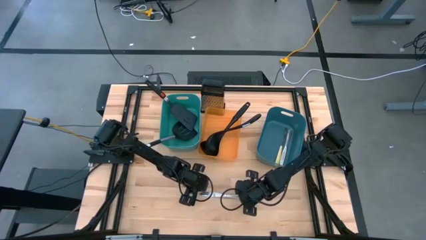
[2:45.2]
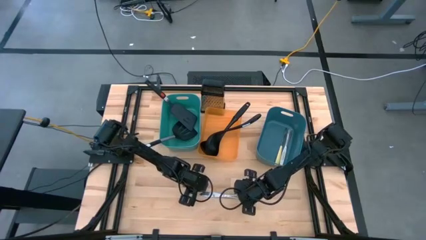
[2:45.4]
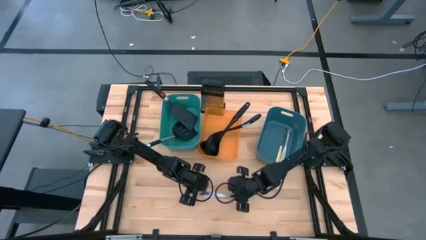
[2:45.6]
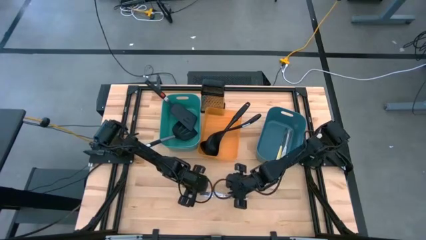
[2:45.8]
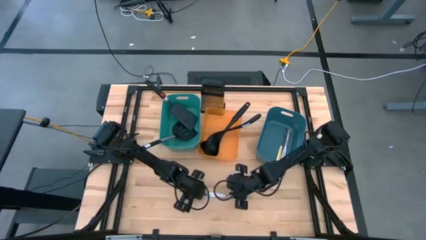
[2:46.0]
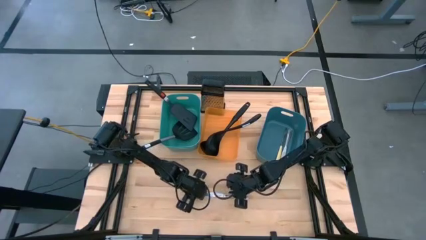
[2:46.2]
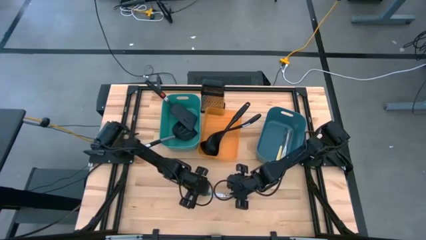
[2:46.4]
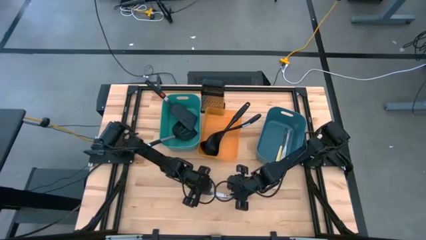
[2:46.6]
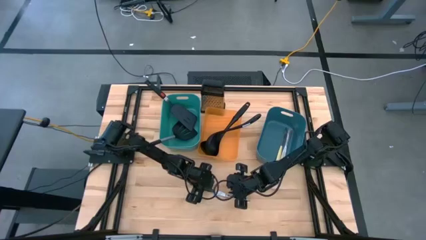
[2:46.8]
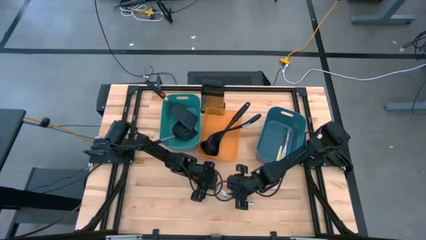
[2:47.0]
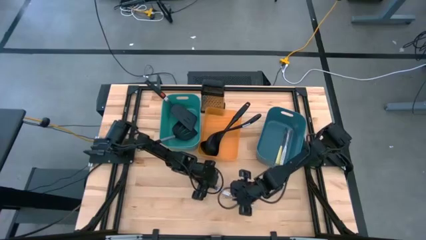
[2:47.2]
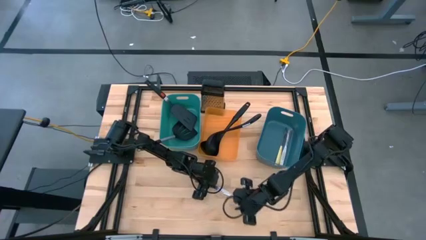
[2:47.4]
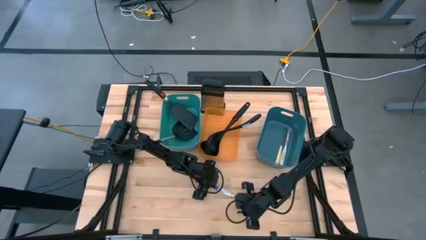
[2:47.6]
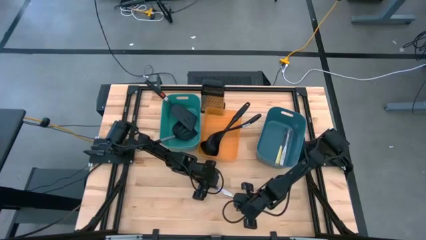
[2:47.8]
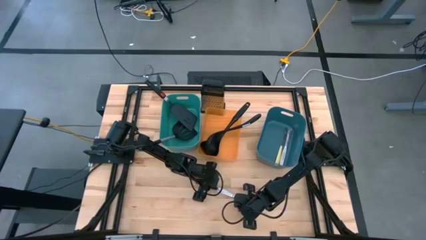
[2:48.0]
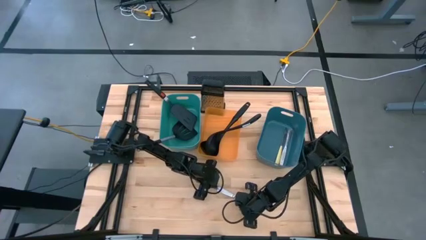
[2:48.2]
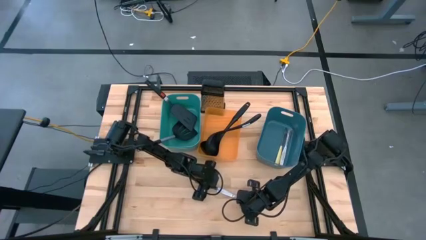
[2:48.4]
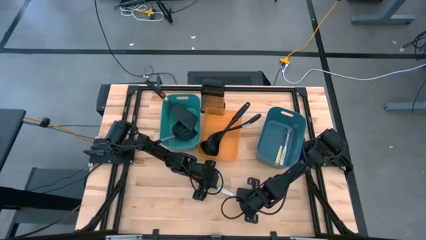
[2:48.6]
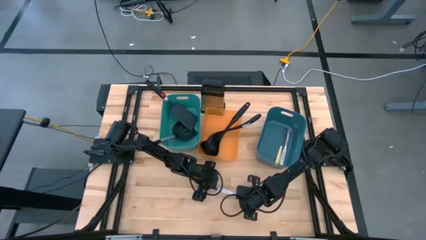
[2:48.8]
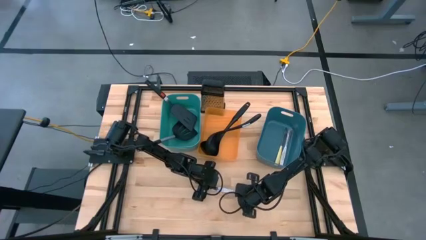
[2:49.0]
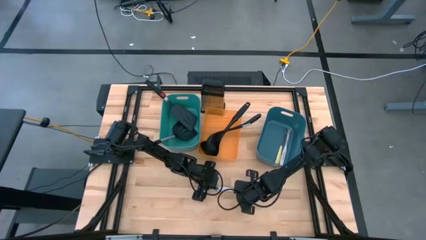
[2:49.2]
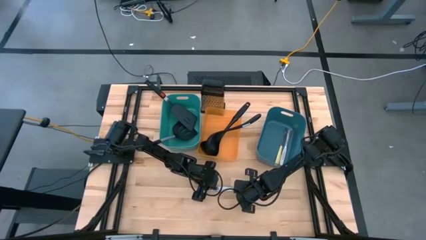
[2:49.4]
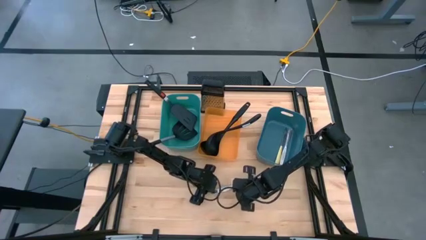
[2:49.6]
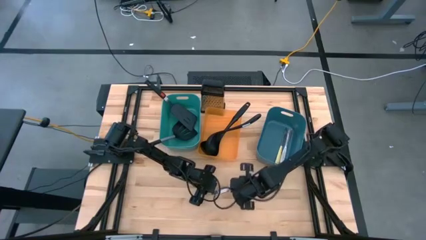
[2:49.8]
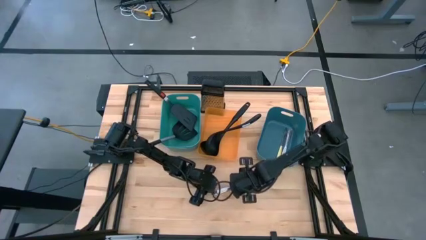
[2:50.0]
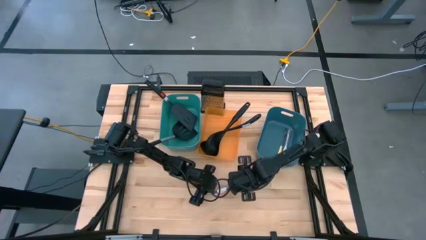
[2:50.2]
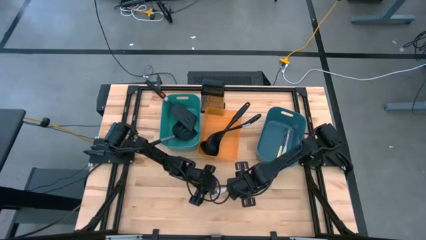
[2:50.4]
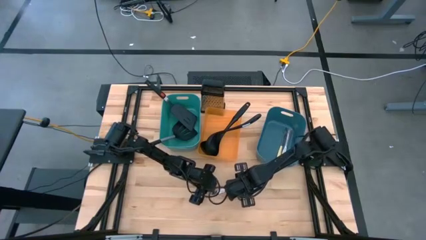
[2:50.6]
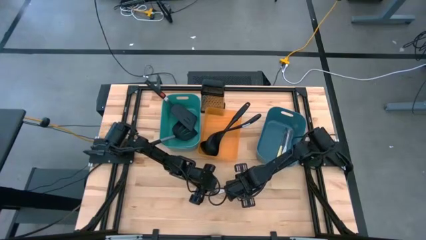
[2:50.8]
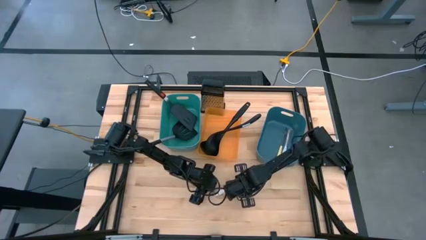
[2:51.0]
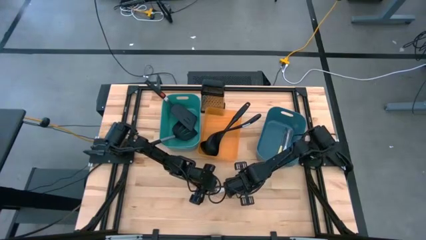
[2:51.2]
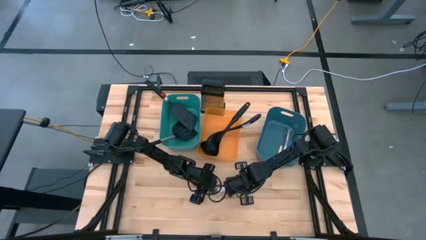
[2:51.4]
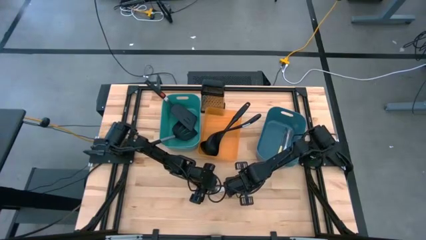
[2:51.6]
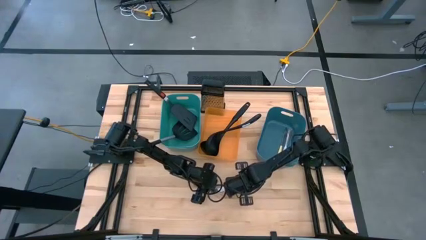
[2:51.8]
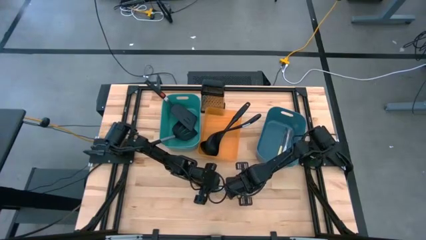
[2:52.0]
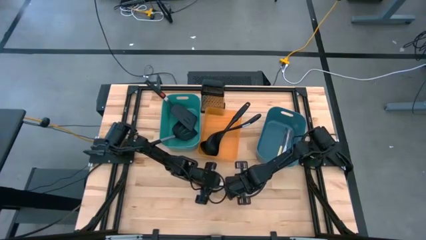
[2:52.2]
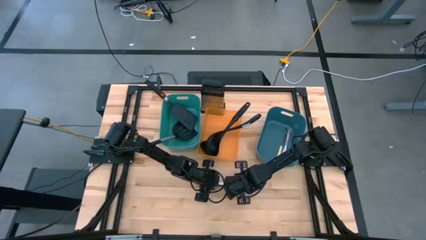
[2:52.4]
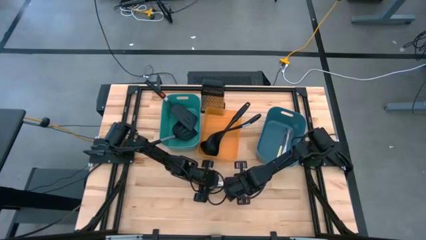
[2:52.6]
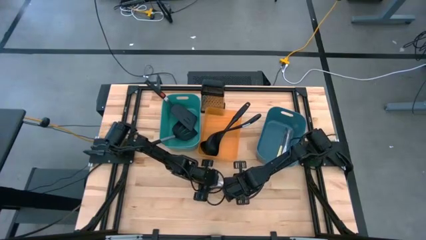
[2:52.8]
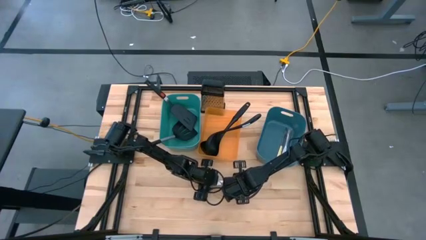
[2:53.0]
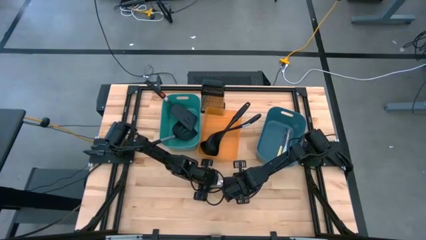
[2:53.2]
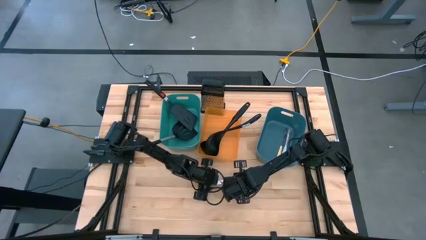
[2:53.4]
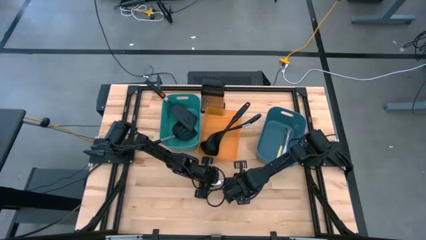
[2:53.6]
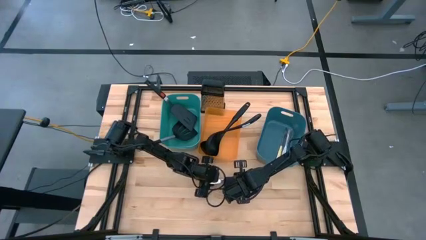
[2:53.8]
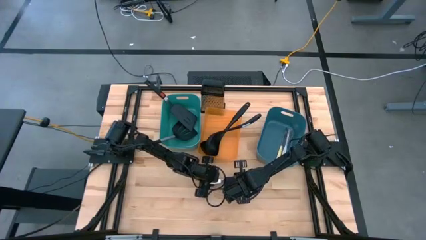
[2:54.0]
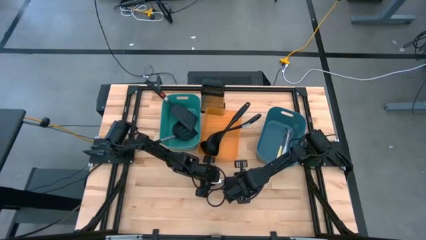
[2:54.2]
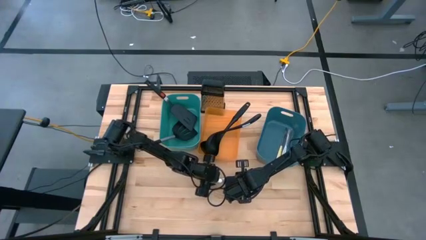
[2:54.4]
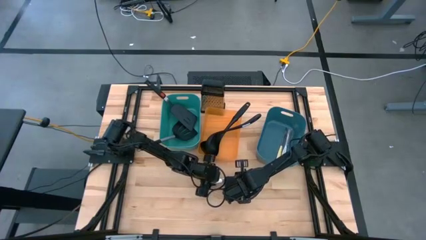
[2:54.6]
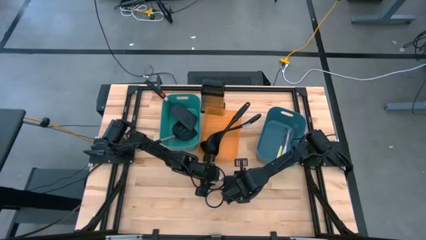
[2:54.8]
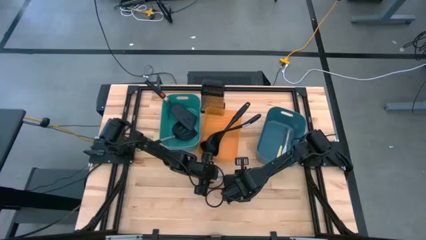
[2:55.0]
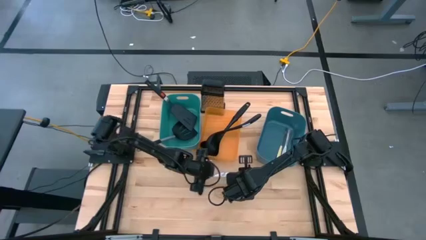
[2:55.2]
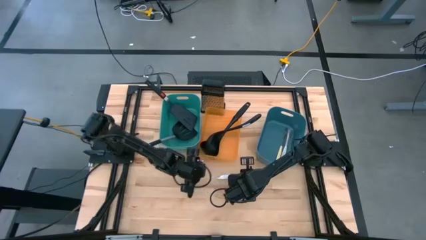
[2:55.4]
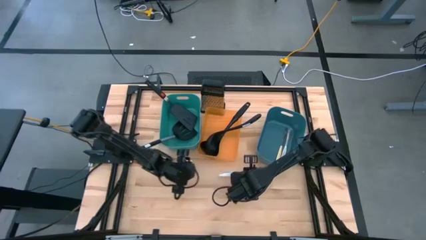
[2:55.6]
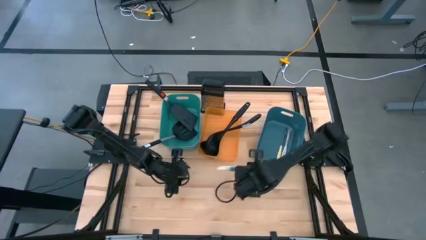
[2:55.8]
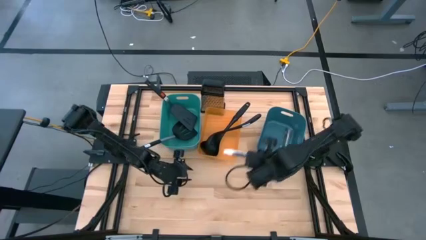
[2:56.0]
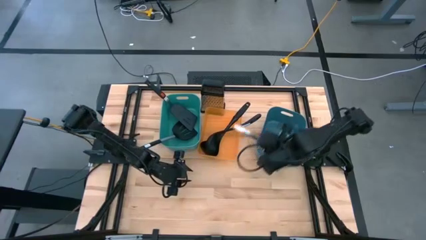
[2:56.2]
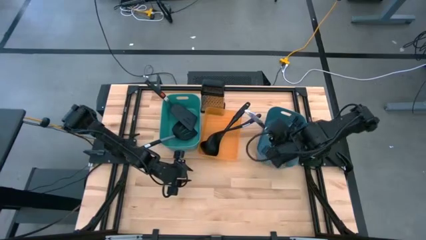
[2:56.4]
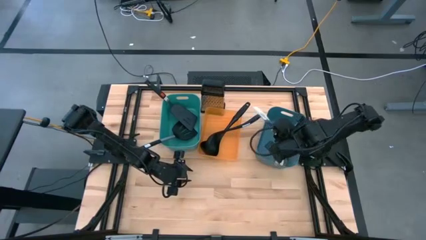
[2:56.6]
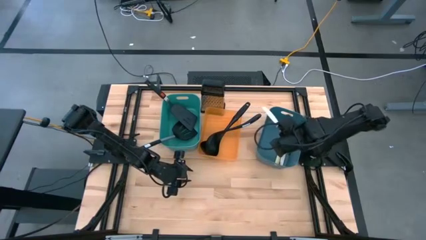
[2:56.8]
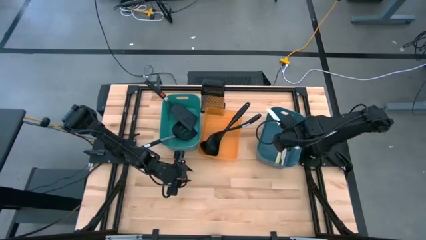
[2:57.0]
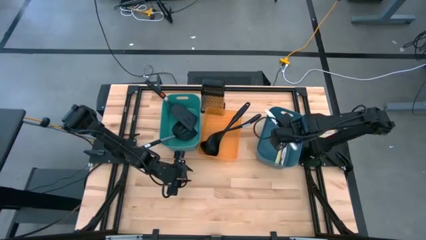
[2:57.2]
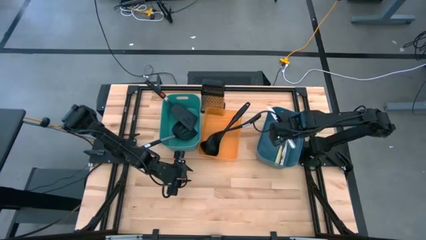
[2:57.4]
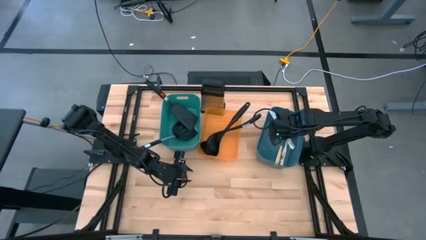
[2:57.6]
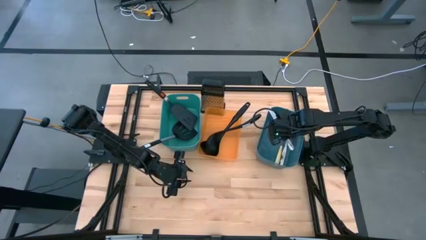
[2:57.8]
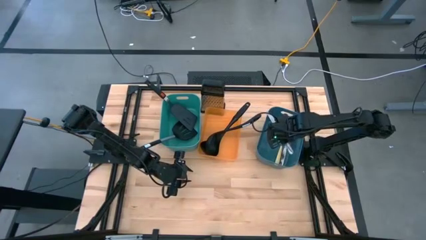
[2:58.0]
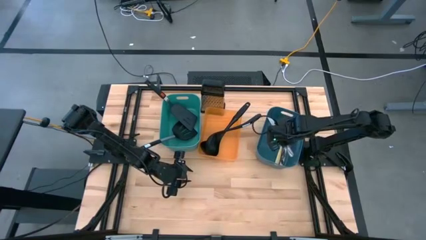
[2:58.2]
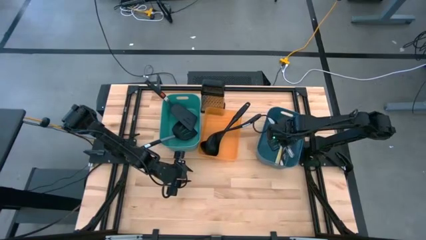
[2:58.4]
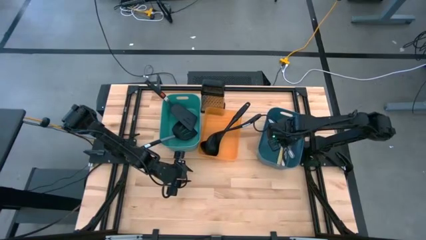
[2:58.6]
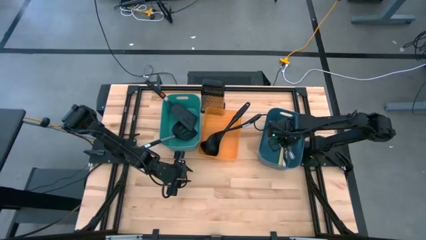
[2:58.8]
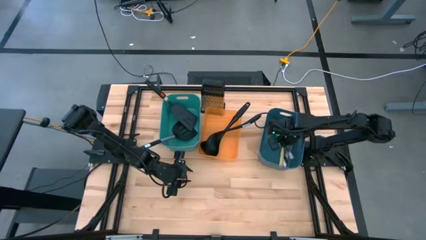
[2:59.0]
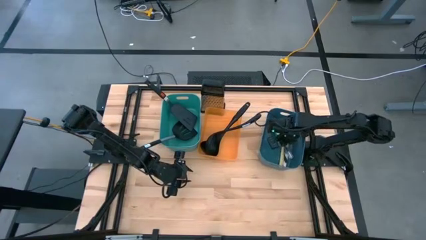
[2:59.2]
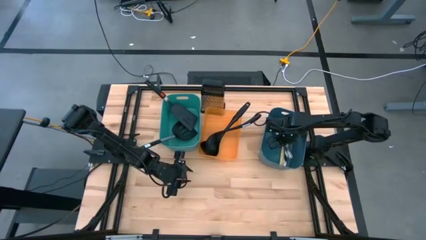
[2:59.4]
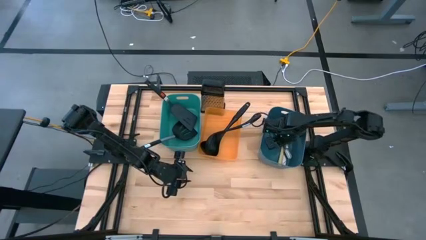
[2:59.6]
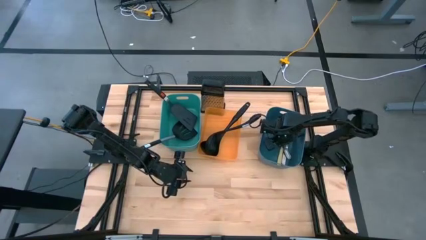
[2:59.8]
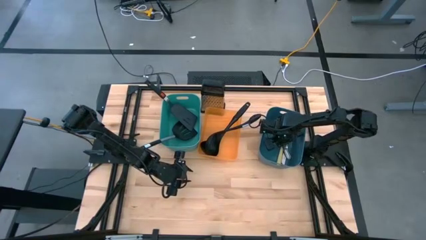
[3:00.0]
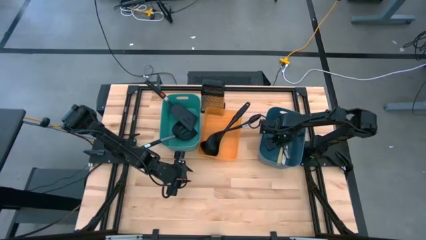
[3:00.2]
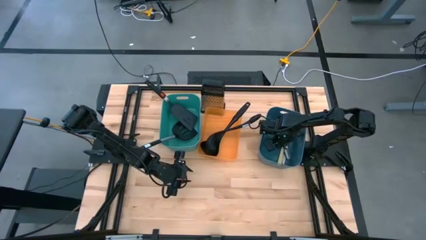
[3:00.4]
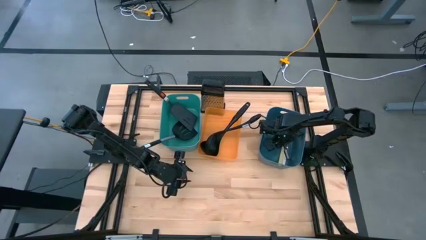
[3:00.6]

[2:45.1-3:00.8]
Task: Pick & Place Kitchen Items
Put the silver table knife into the blue bin
